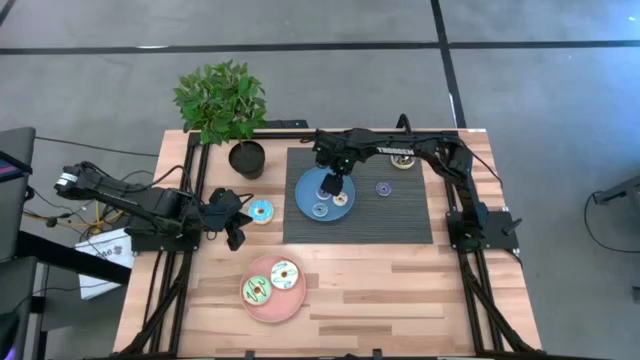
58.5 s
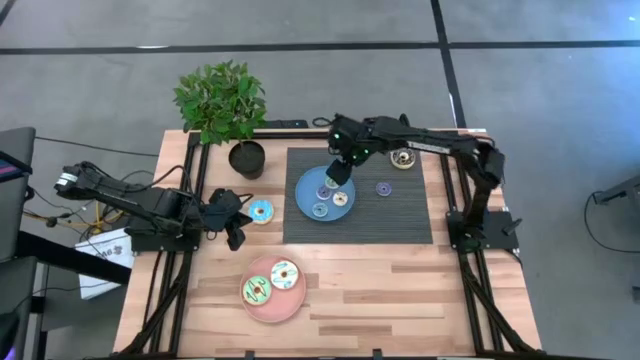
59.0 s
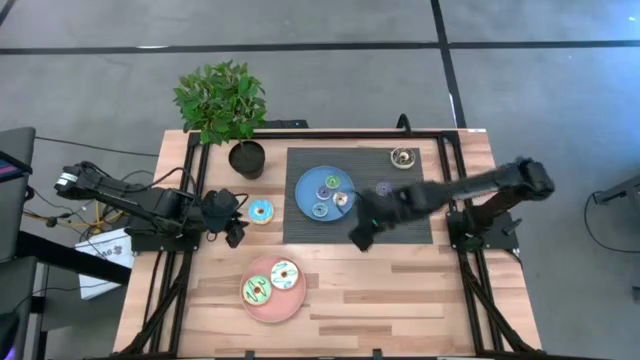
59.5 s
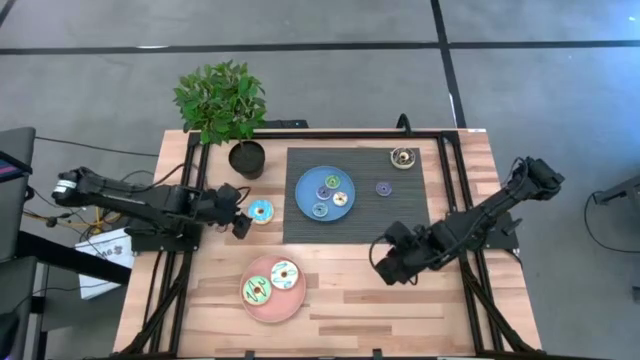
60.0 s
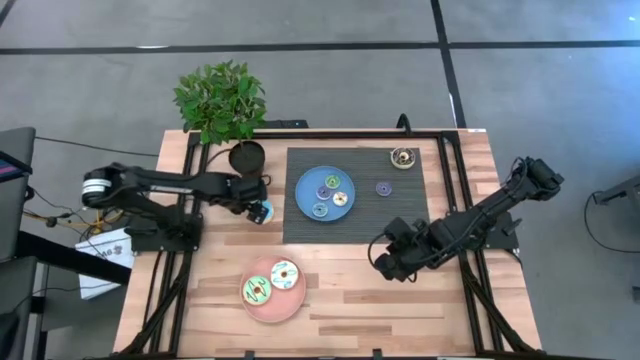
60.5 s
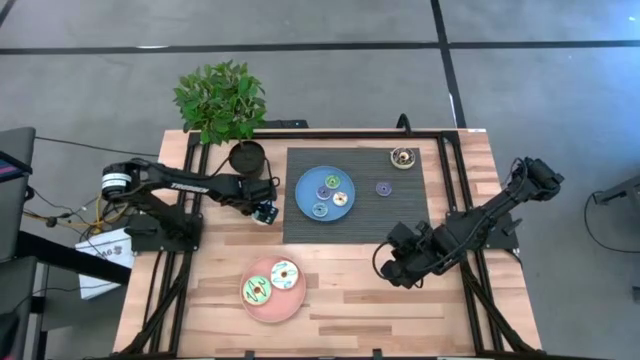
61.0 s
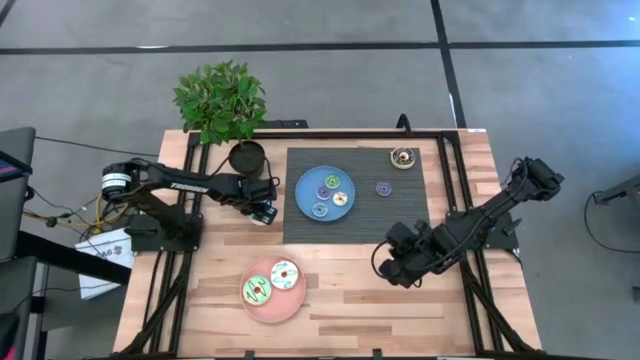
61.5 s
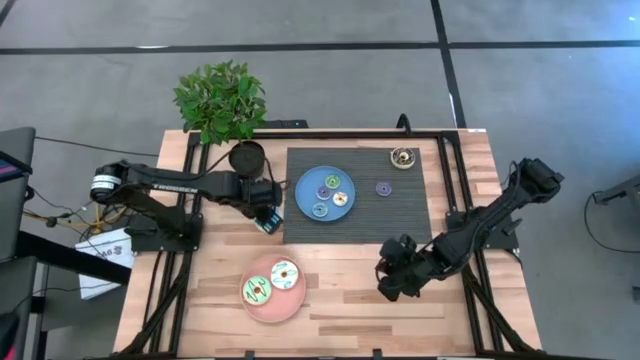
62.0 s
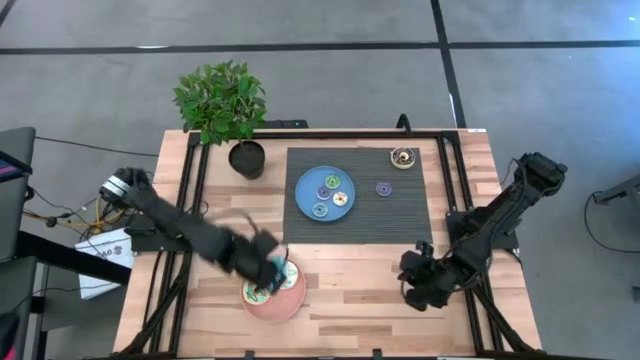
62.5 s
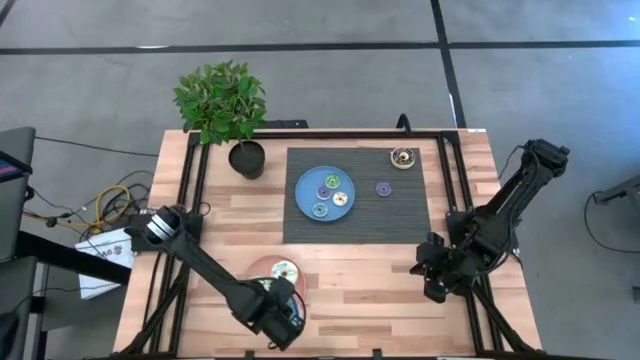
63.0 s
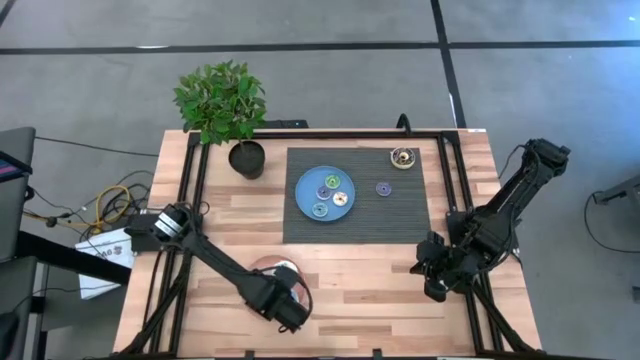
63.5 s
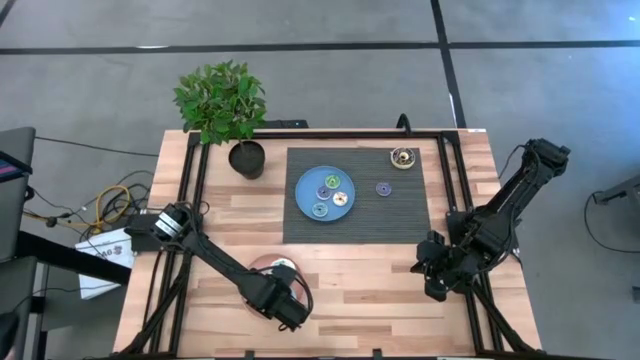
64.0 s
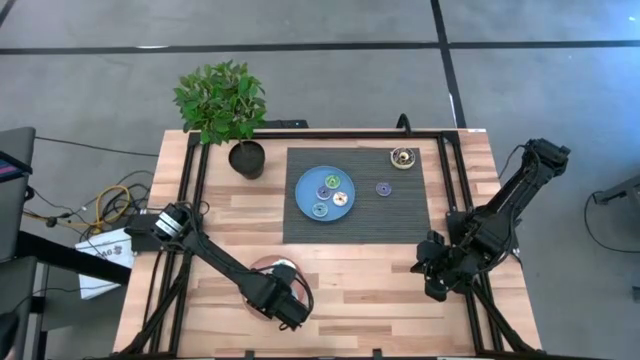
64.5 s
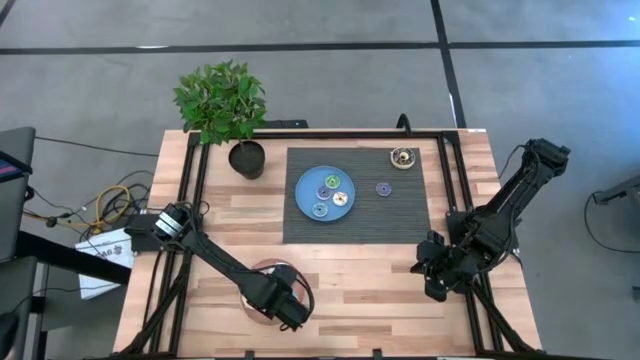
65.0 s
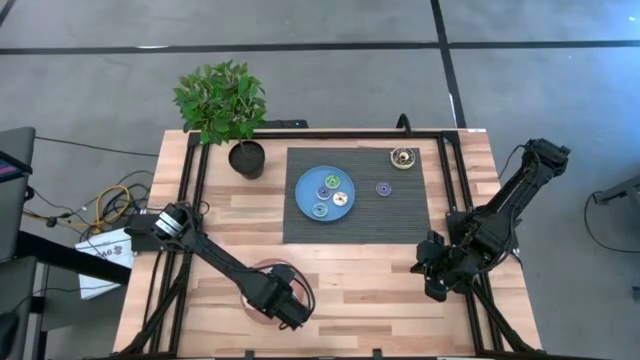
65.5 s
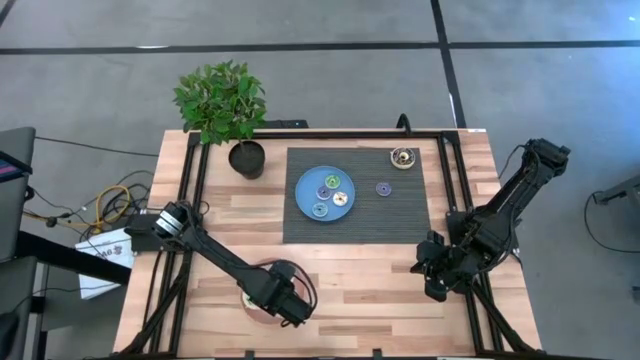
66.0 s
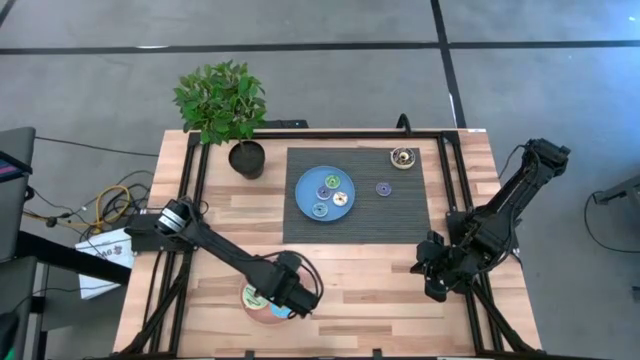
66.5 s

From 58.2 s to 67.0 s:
Task: Pick & Place donuts
Put the large blue donut on the light orange plate

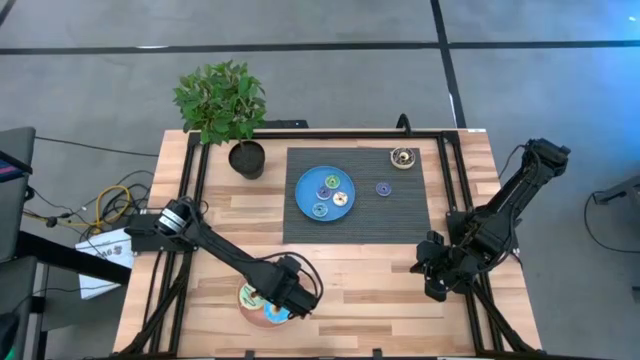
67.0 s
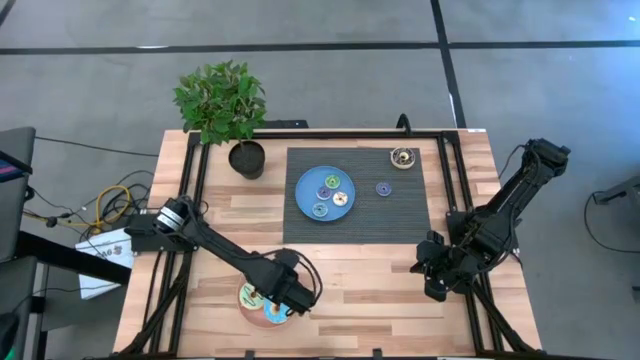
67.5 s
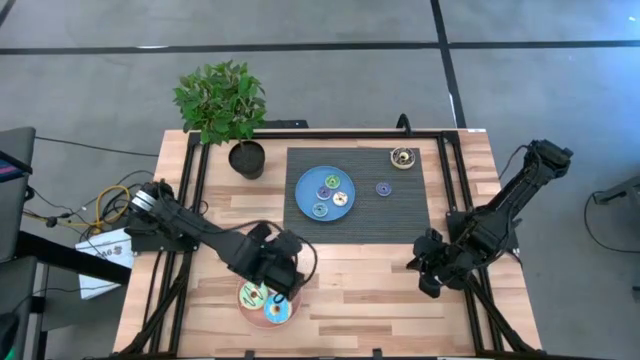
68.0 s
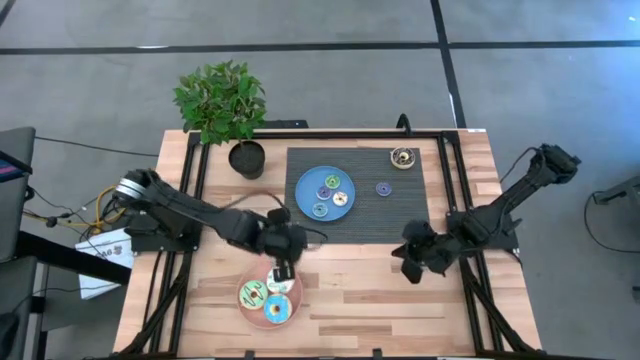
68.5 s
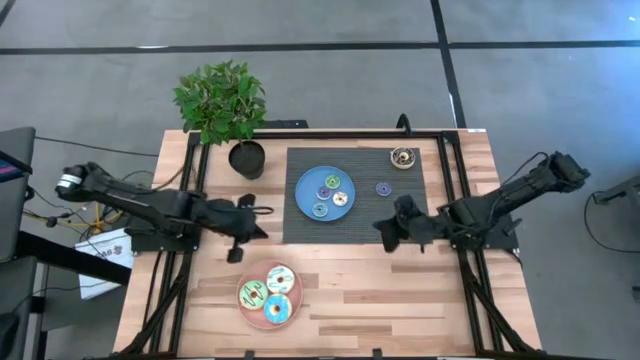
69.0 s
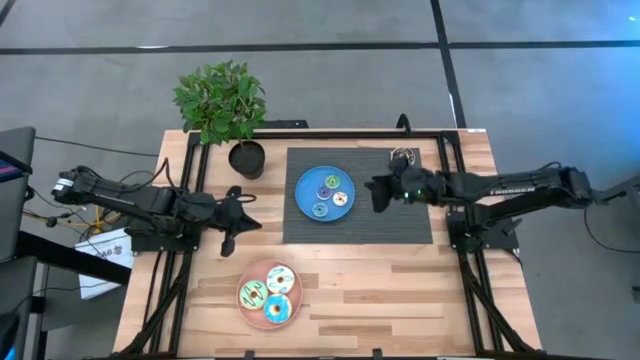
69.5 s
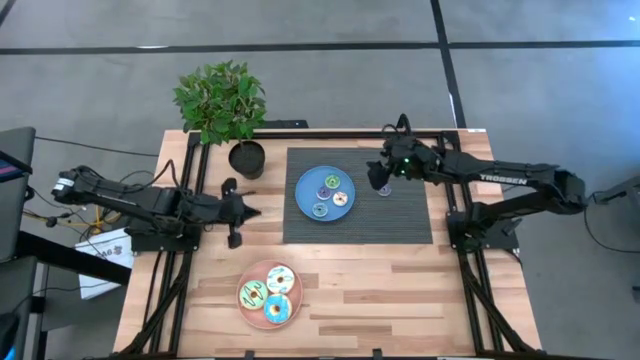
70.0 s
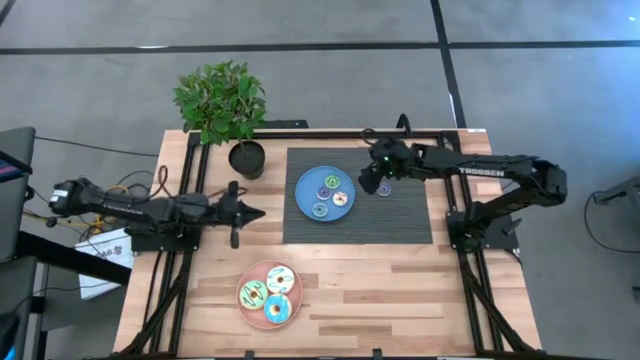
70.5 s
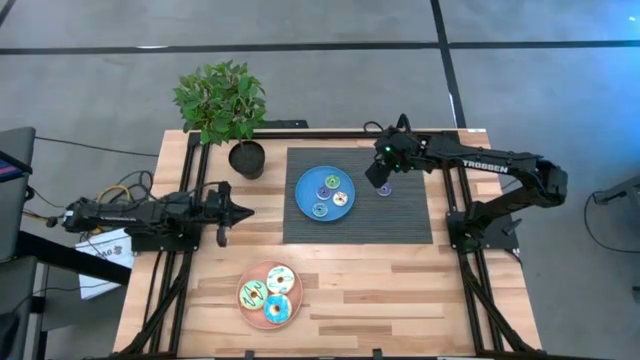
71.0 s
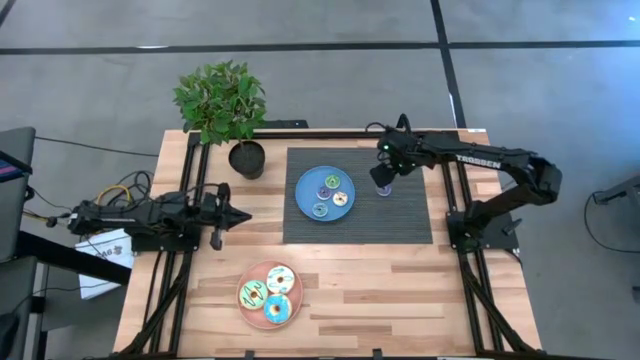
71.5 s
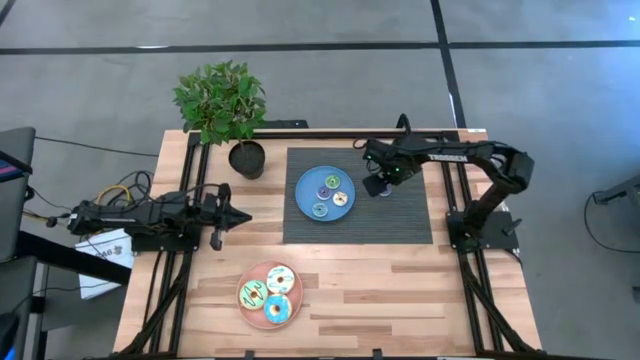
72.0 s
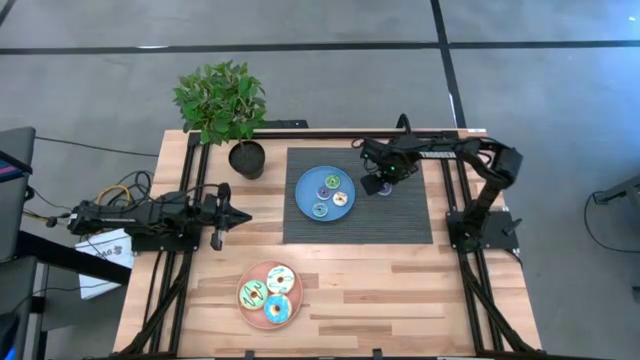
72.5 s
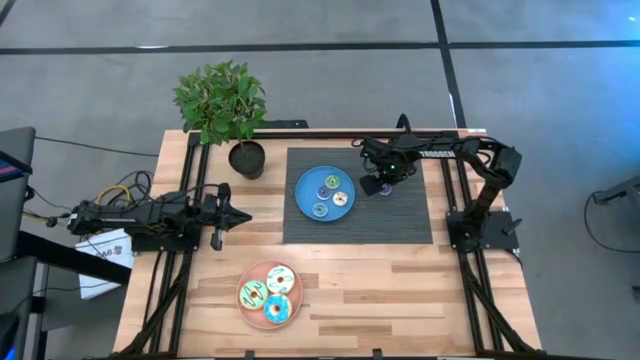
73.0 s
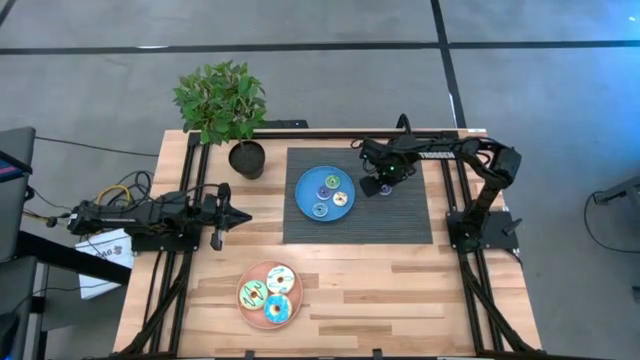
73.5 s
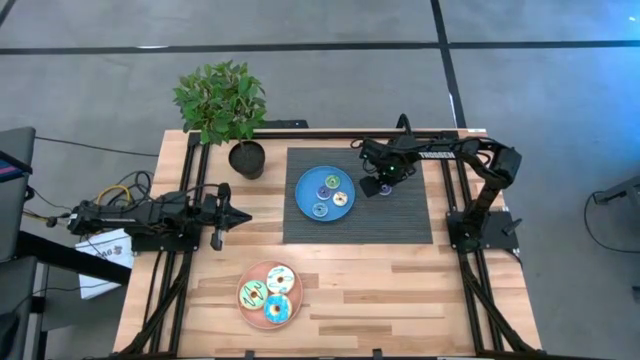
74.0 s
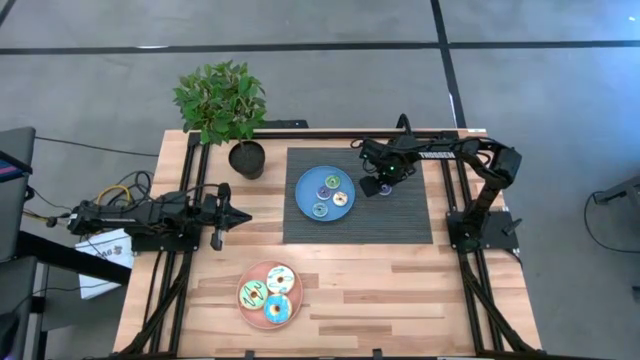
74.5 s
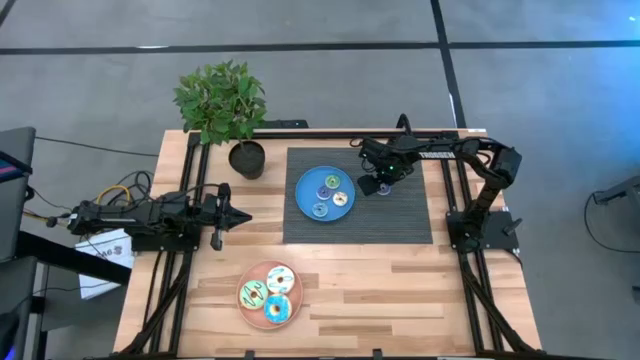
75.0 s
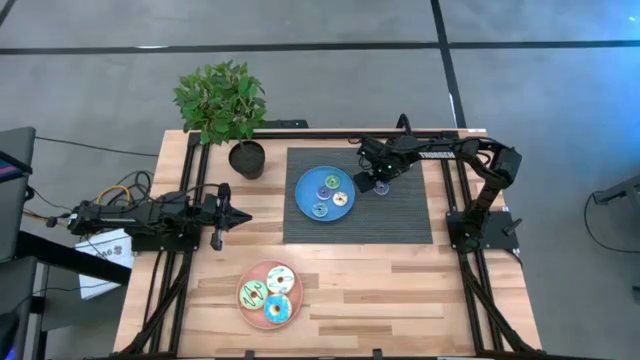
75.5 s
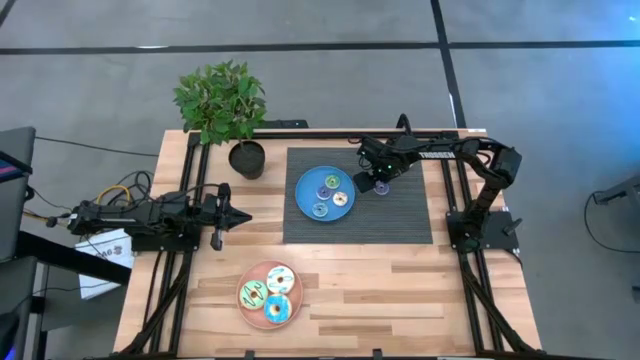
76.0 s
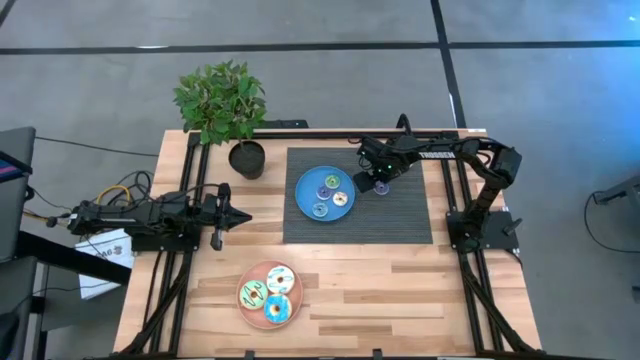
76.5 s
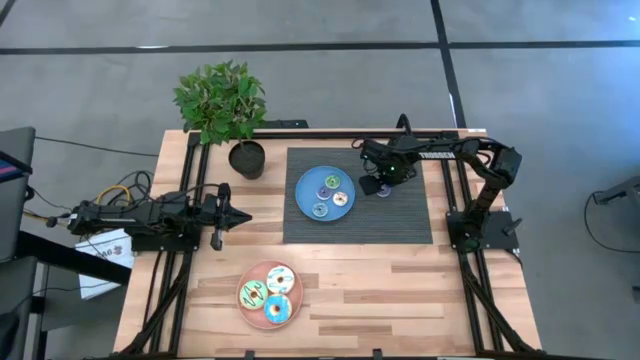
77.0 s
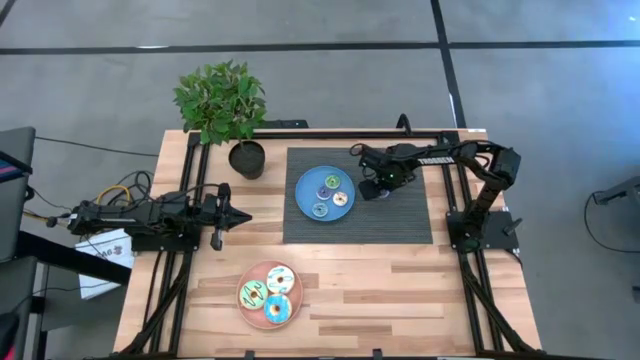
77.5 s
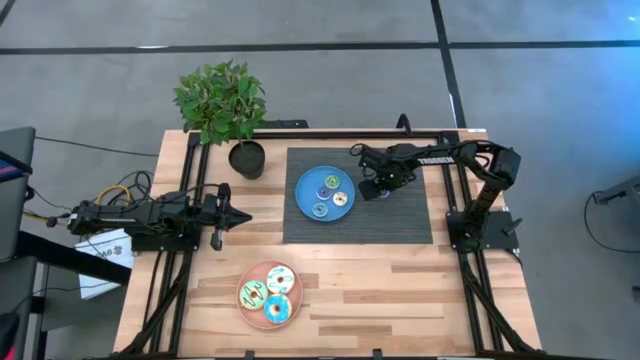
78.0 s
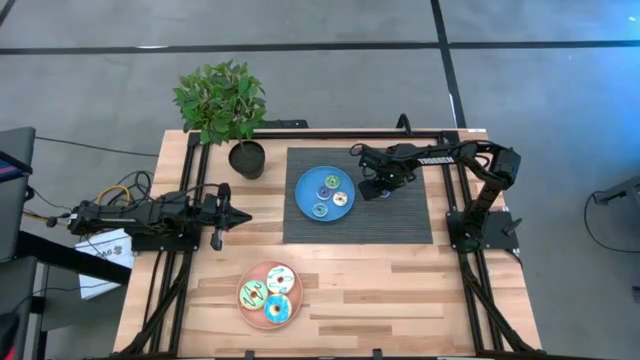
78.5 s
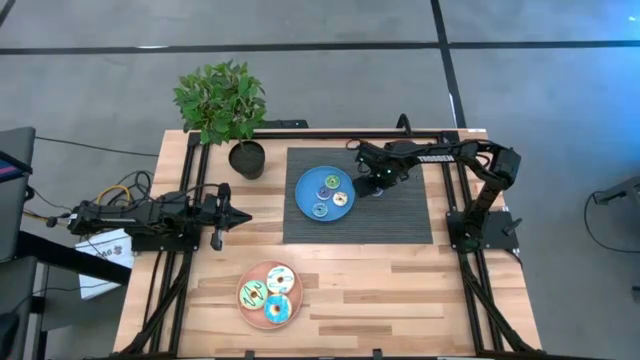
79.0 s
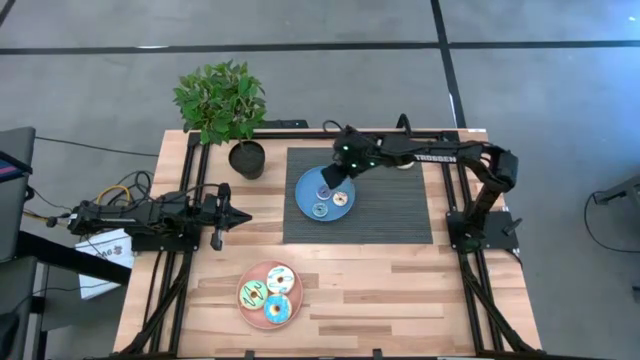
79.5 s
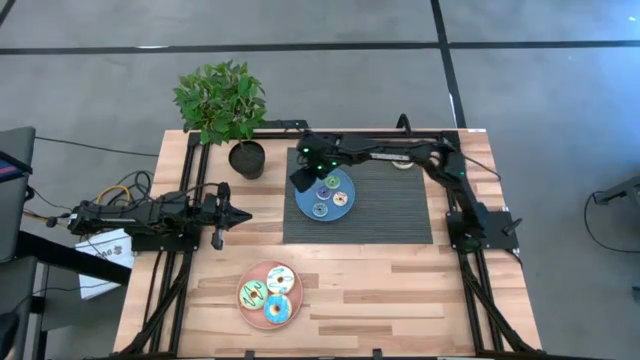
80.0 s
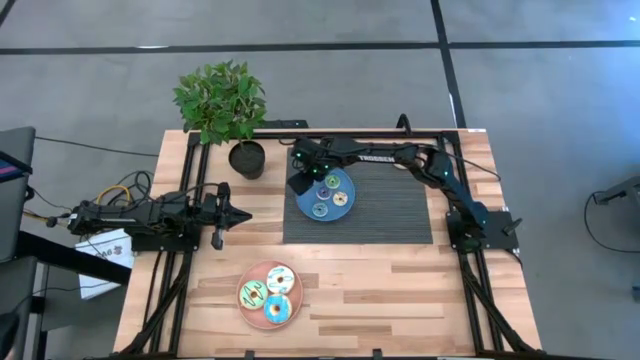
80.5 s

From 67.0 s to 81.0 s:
Put the small violet donut on the blue plate

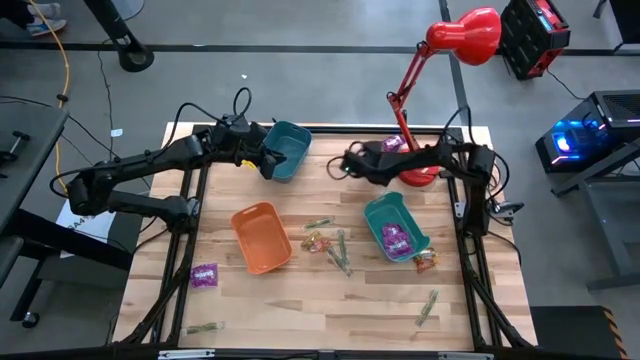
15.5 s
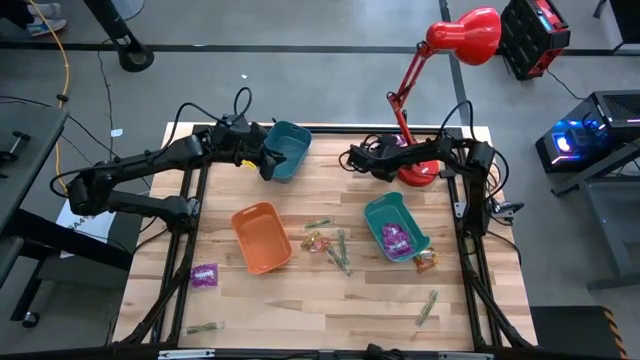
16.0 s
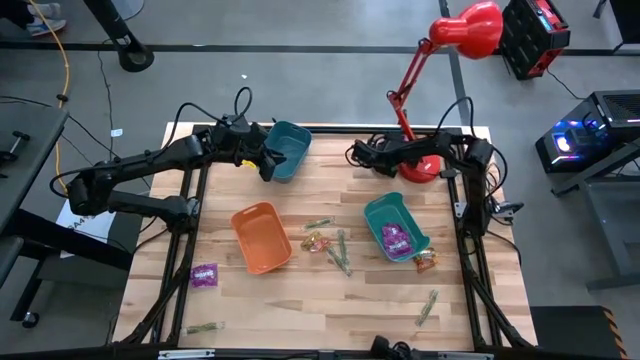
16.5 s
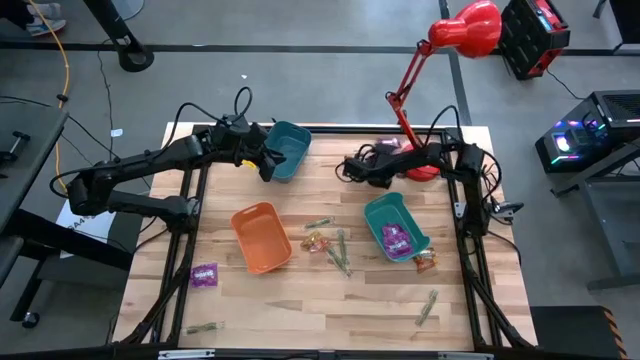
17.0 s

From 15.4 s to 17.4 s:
Task: Sort candy
Adjust the blue candy
